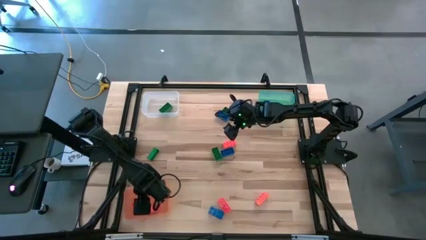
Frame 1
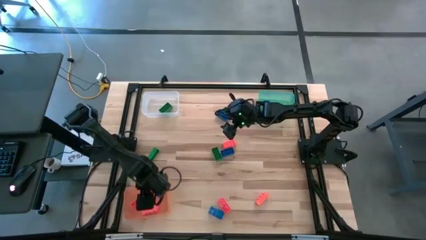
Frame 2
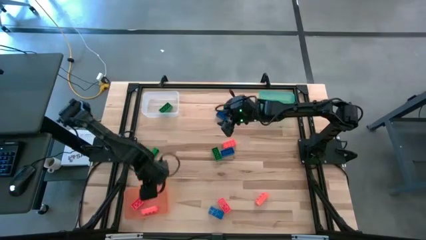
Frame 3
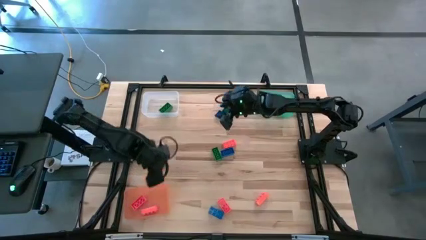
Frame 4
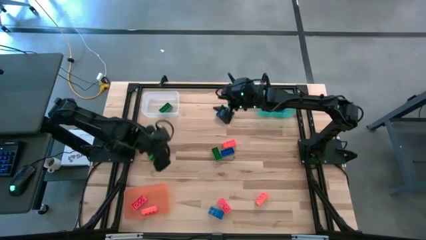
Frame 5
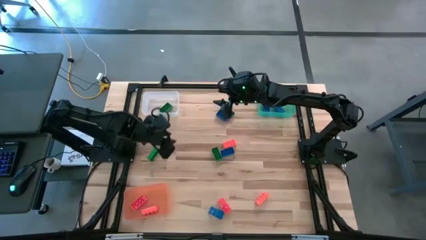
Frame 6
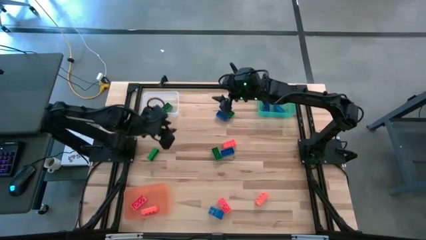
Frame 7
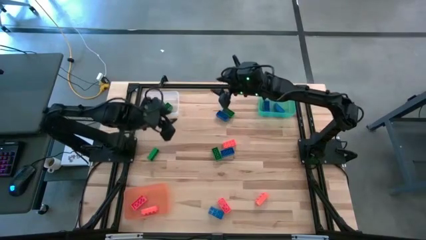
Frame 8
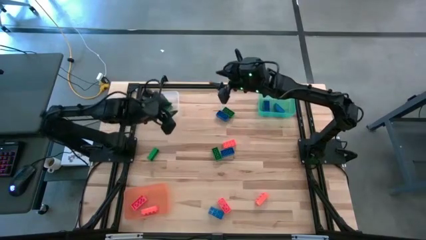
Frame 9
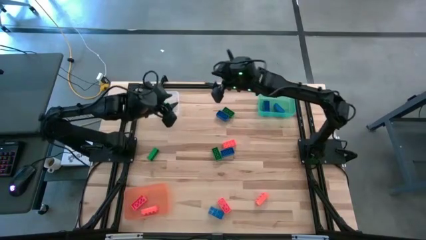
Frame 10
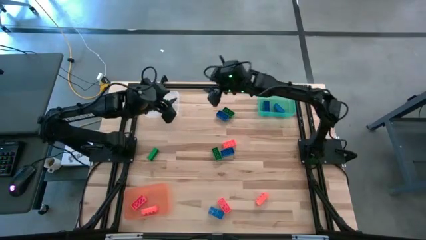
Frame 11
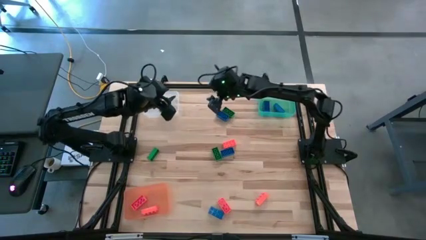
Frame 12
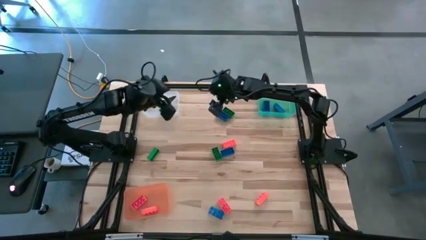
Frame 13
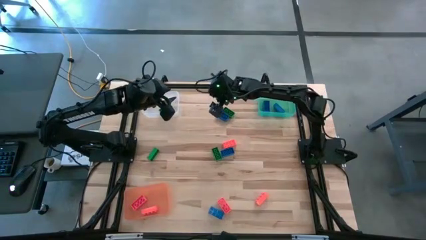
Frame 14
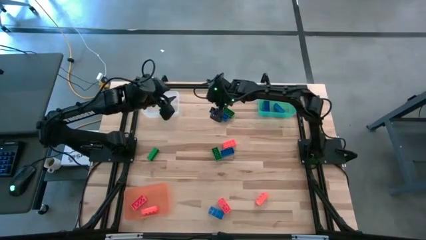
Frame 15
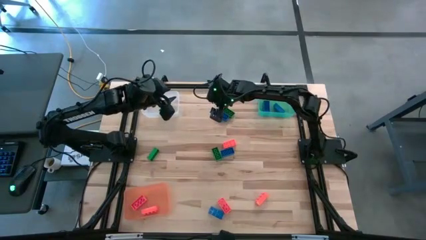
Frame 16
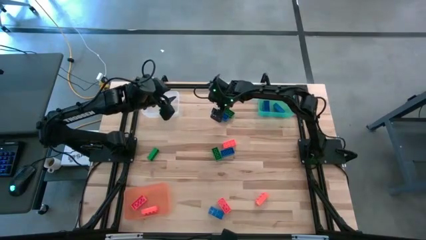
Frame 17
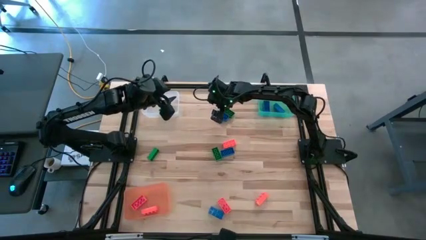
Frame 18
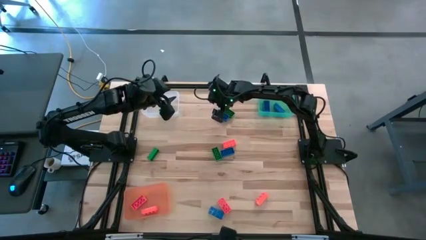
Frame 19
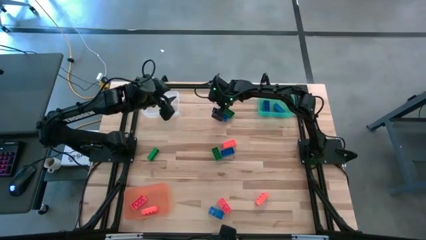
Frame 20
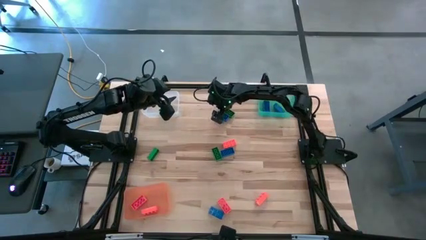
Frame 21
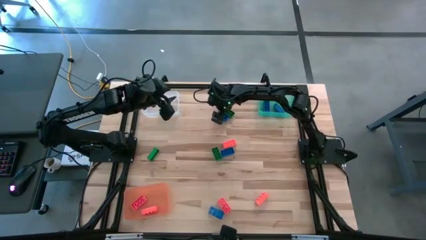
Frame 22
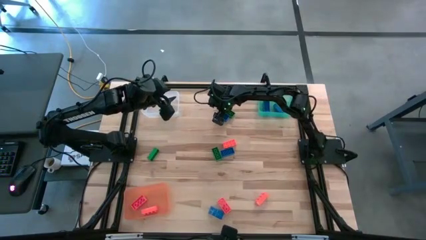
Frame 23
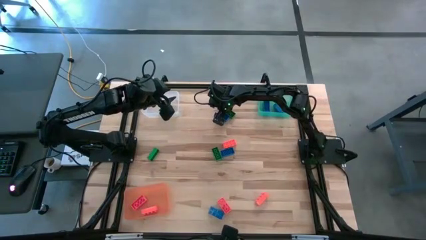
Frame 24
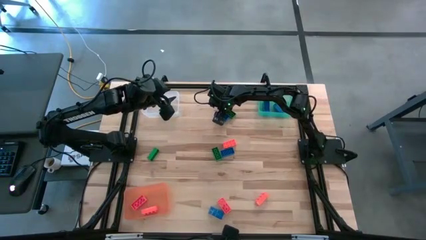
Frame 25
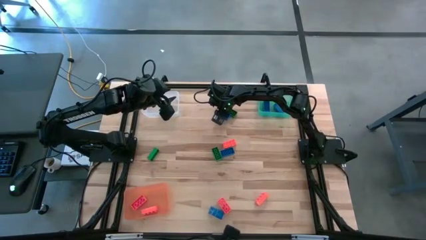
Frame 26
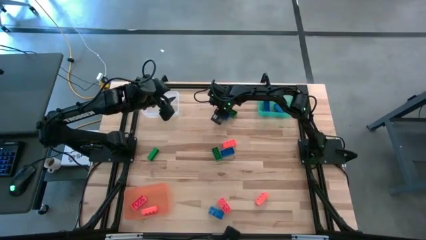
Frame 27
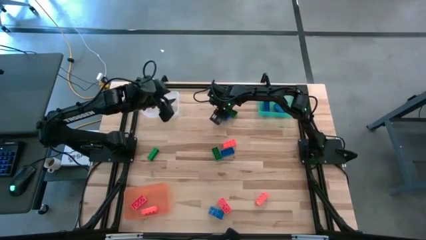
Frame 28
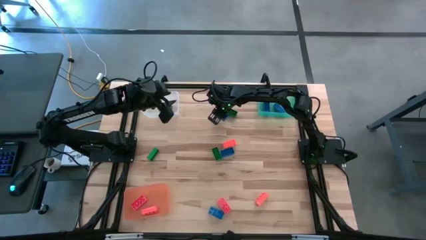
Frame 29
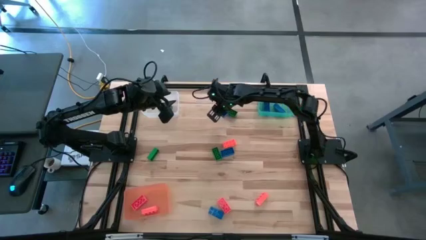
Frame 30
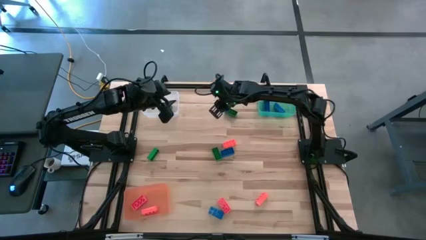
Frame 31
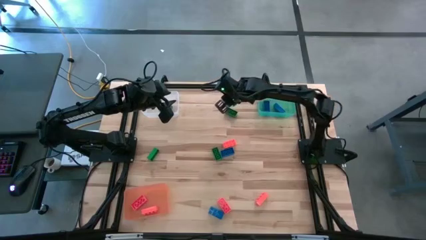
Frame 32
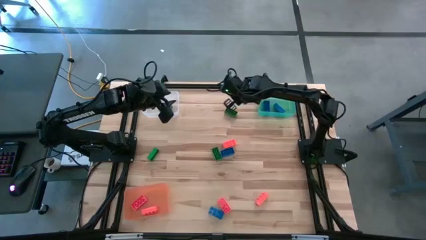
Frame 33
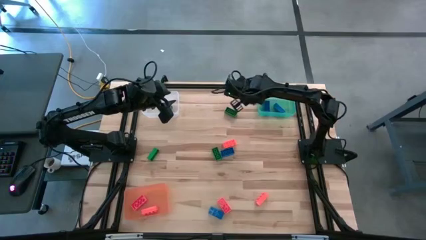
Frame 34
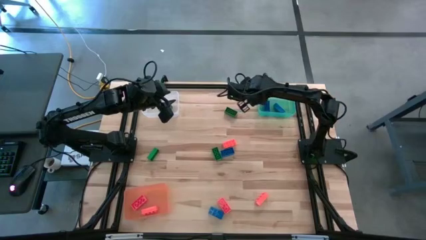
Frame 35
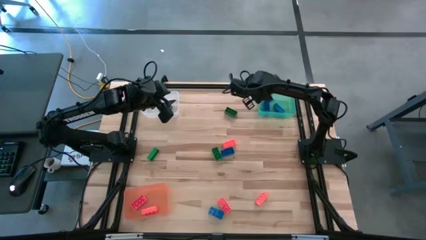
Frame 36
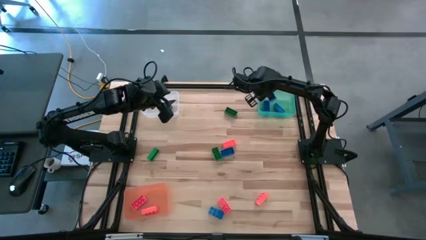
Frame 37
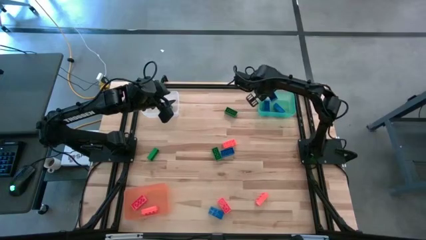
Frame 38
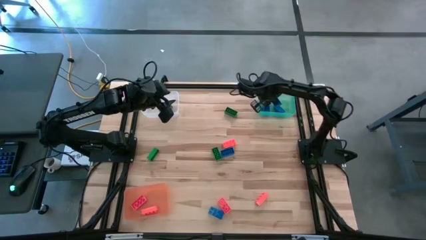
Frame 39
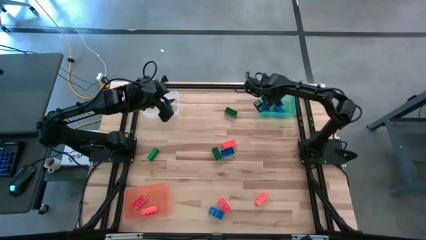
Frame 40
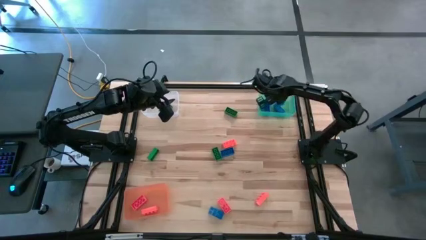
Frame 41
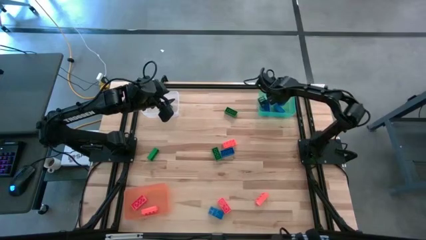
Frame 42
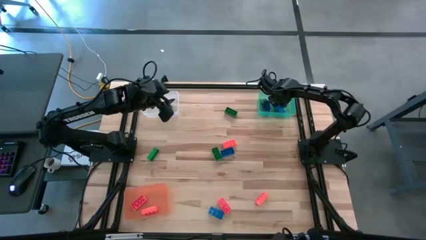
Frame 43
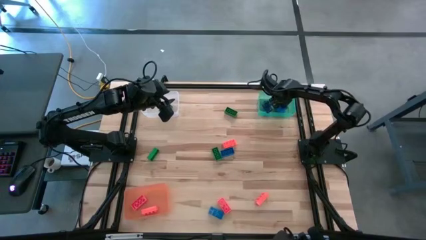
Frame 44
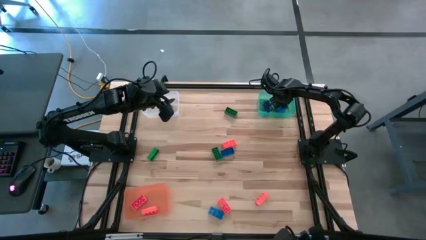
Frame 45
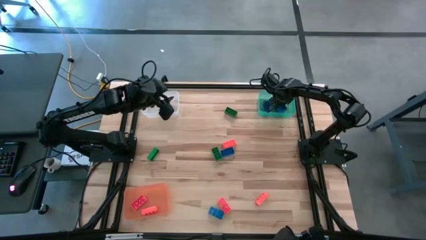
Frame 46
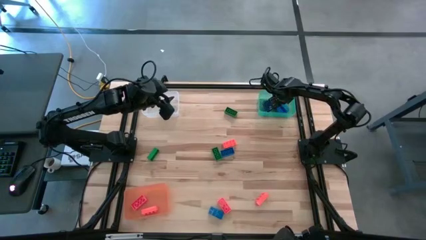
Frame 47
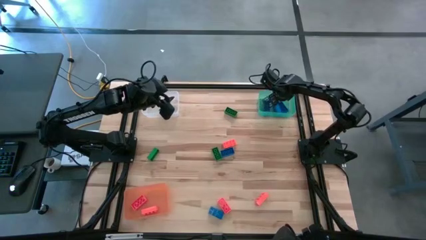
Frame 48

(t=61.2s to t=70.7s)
Task: Sort & place blocks by color
Put the blue game piece into the green bin

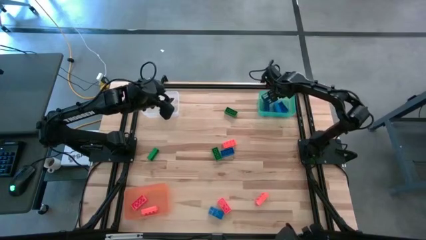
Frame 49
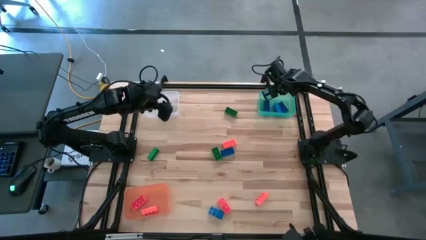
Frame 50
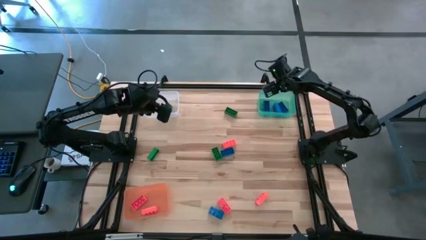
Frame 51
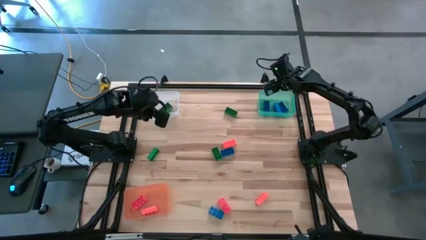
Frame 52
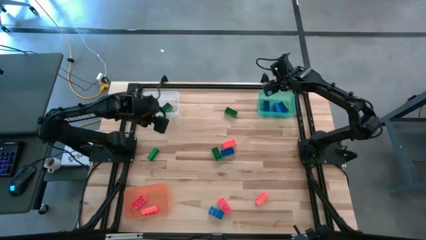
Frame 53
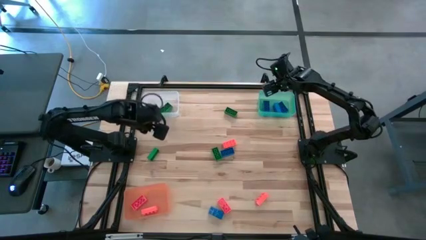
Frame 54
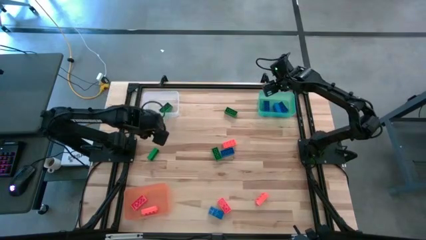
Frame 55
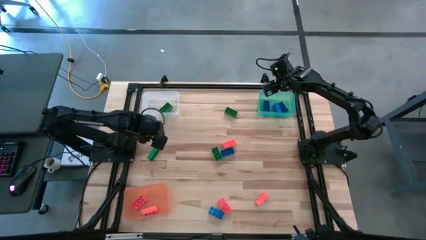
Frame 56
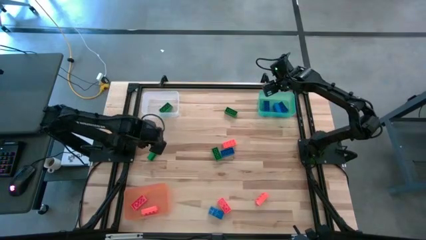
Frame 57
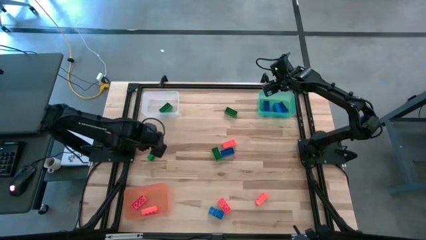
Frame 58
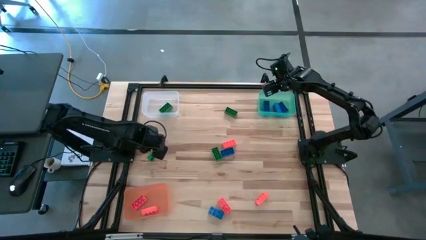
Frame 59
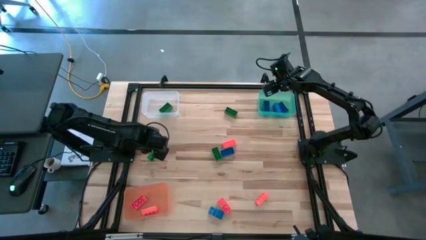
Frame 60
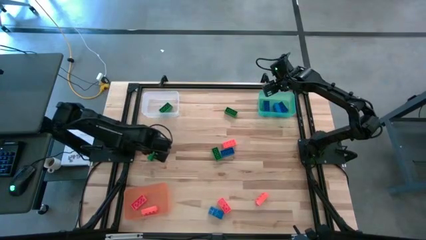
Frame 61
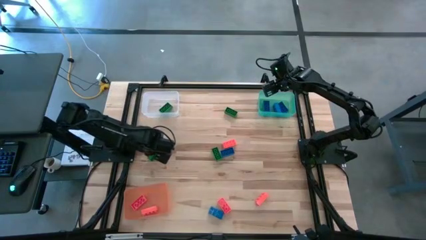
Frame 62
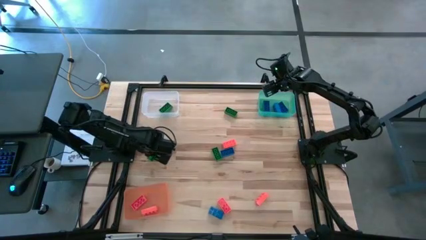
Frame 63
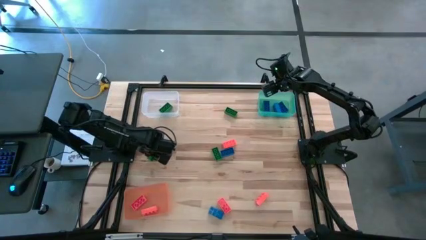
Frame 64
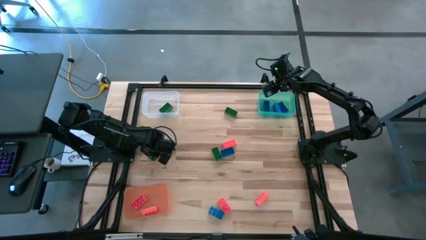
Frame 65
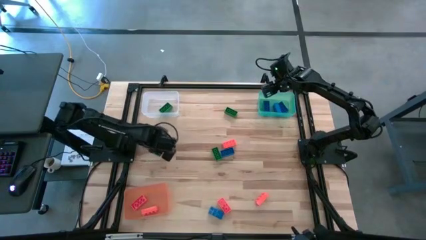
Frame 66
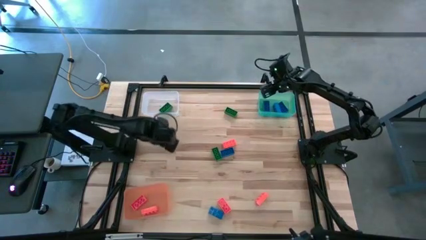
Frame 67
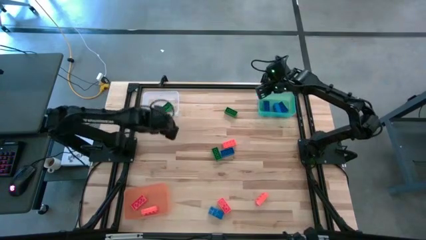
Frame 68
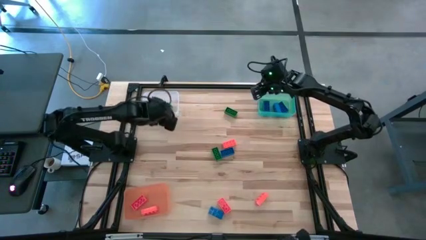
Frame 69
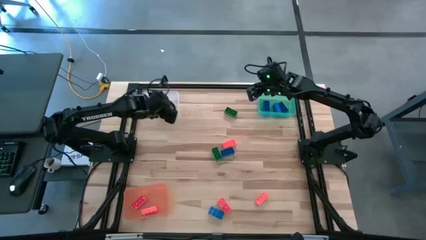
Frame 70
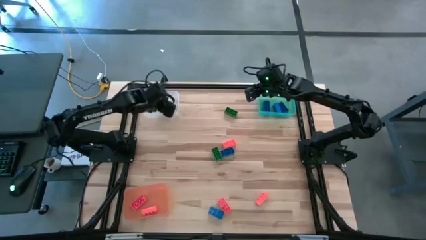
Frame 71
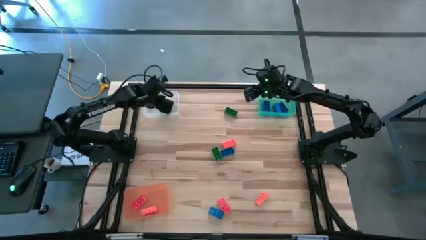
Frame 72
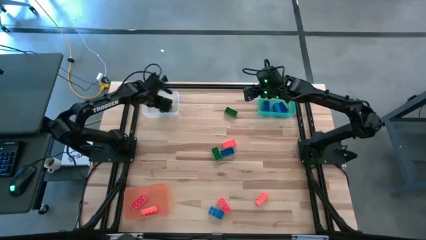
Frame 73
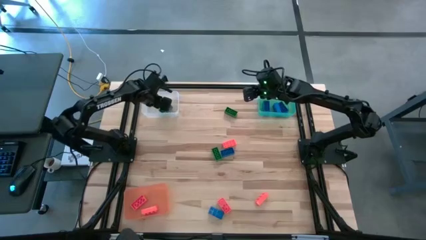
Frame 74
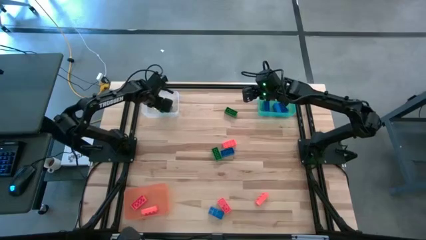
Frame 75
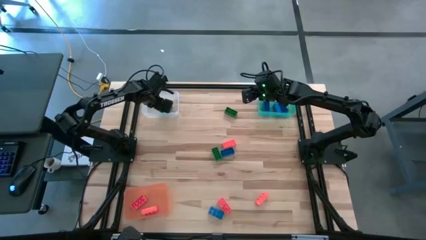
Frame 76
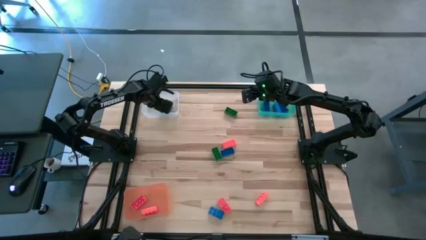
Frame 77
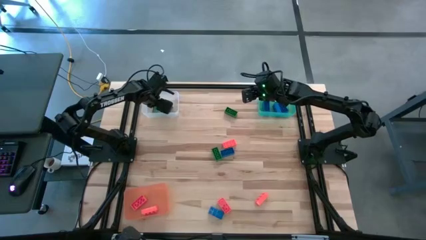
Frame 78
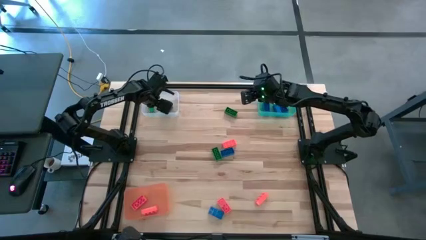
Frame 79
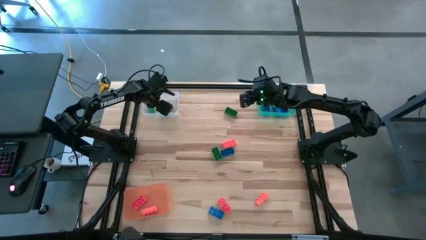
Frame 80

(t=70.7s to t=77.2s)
Put the green game piece into the transparent bin
